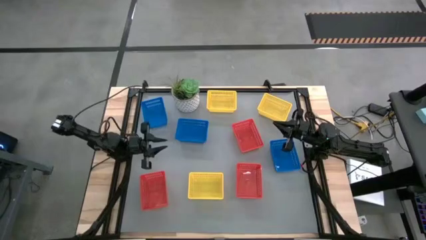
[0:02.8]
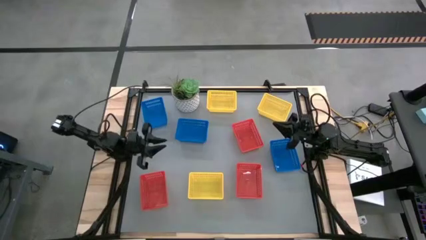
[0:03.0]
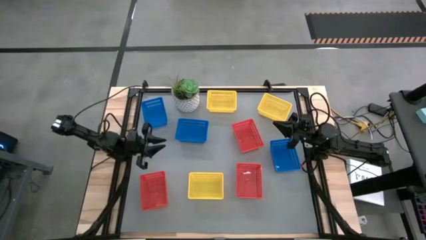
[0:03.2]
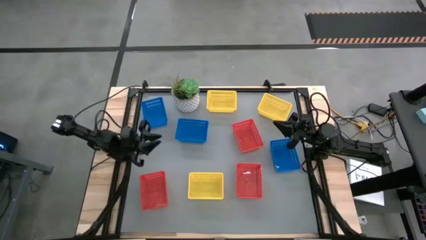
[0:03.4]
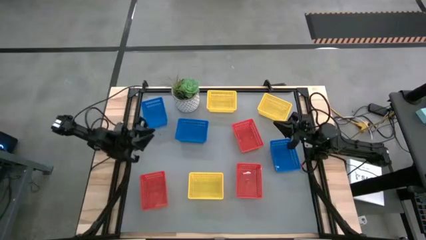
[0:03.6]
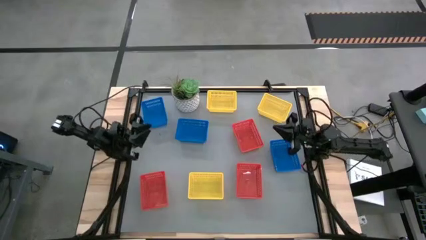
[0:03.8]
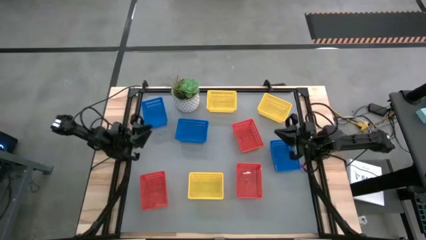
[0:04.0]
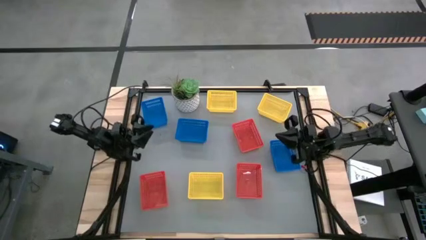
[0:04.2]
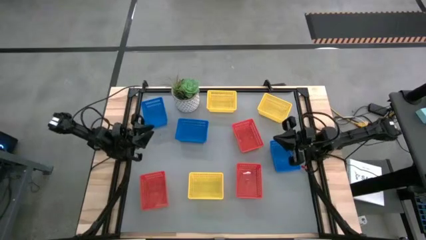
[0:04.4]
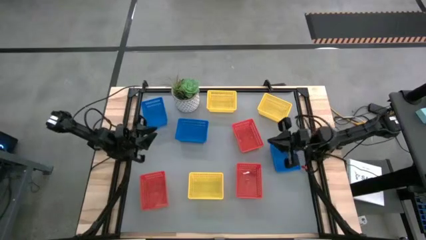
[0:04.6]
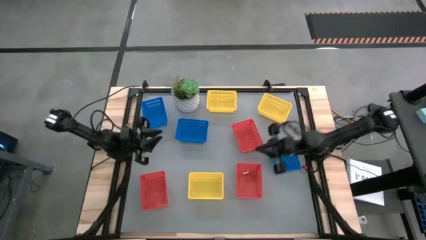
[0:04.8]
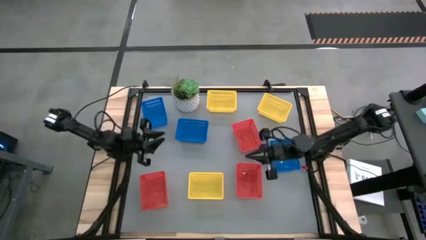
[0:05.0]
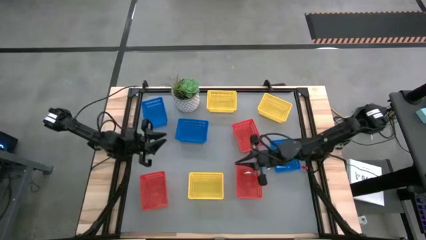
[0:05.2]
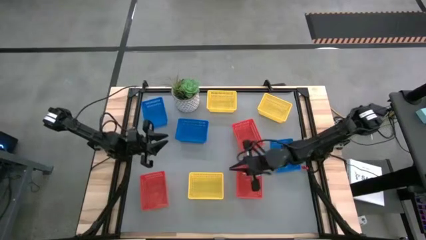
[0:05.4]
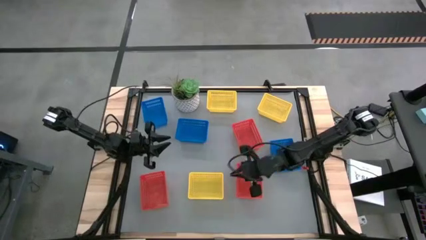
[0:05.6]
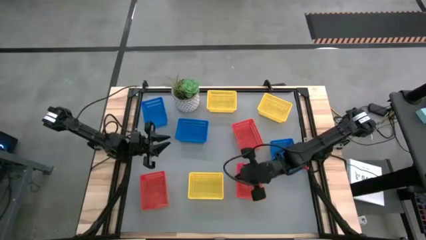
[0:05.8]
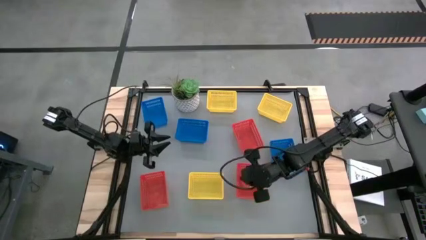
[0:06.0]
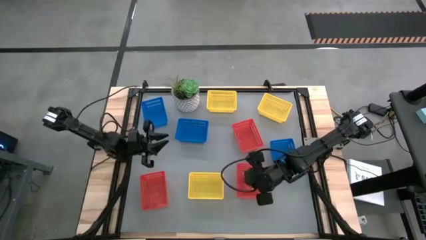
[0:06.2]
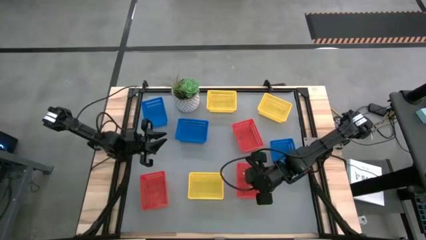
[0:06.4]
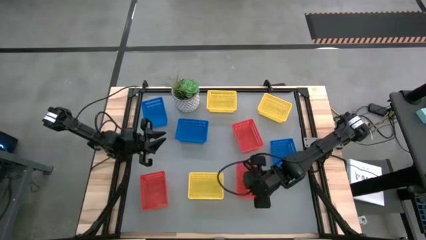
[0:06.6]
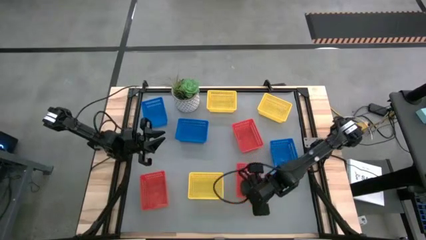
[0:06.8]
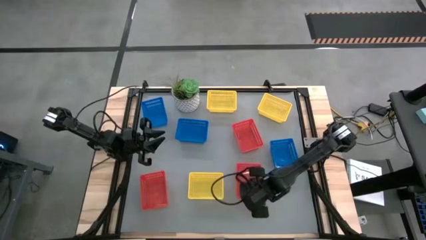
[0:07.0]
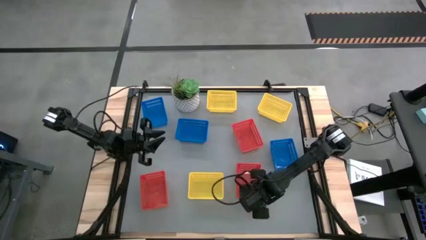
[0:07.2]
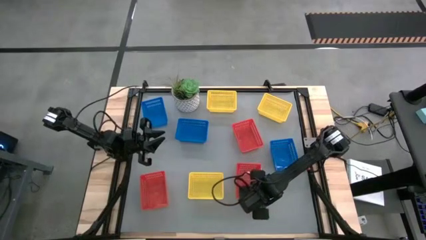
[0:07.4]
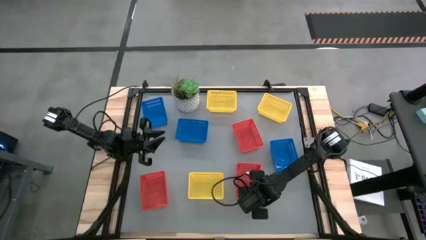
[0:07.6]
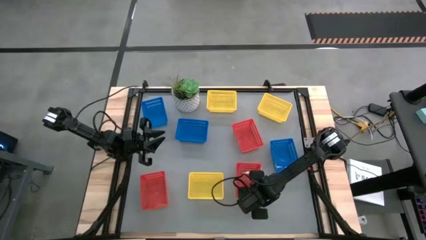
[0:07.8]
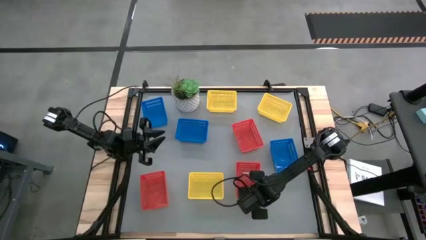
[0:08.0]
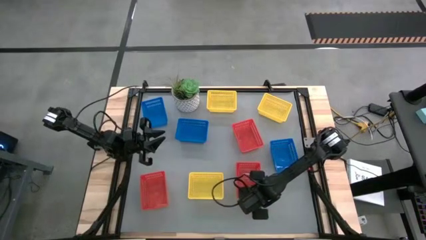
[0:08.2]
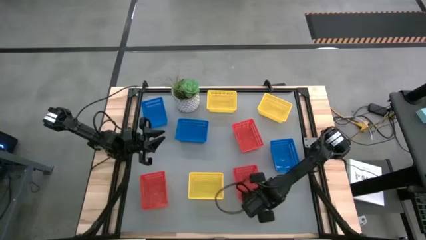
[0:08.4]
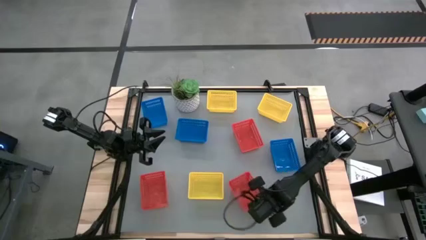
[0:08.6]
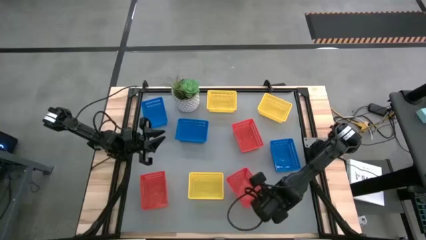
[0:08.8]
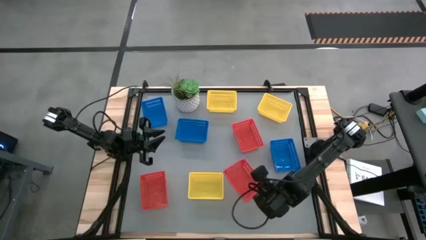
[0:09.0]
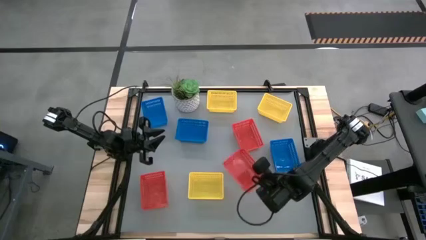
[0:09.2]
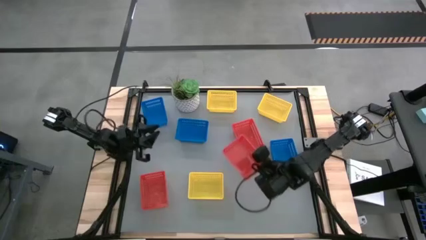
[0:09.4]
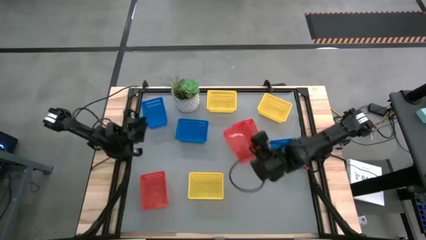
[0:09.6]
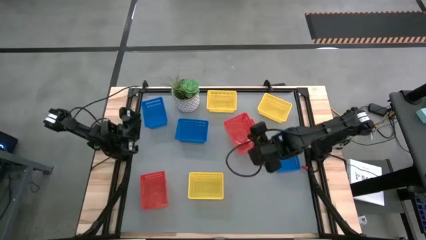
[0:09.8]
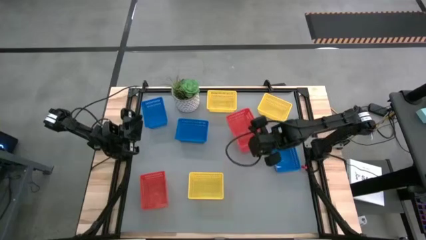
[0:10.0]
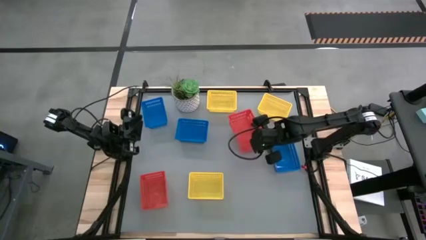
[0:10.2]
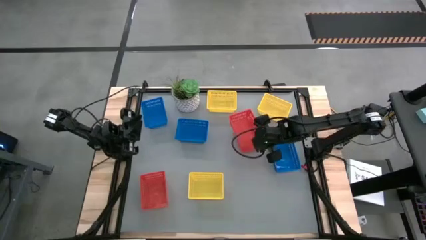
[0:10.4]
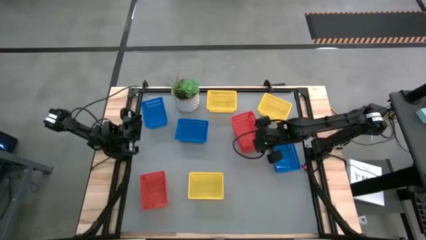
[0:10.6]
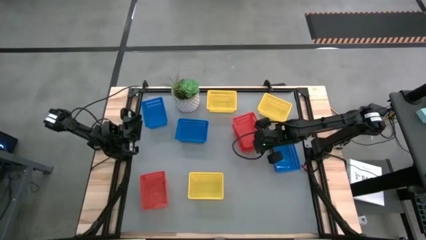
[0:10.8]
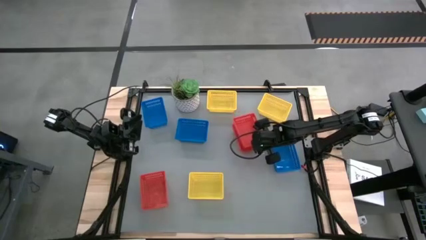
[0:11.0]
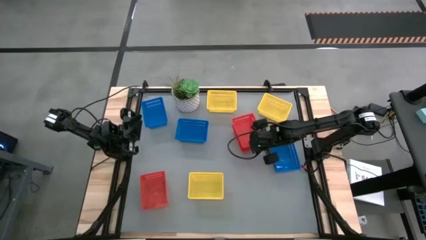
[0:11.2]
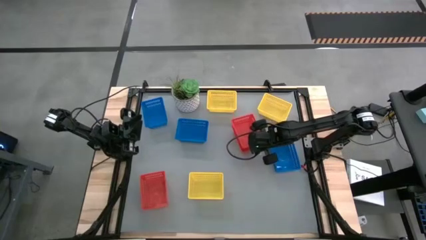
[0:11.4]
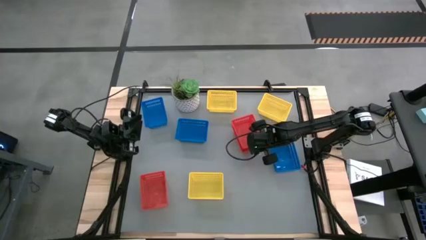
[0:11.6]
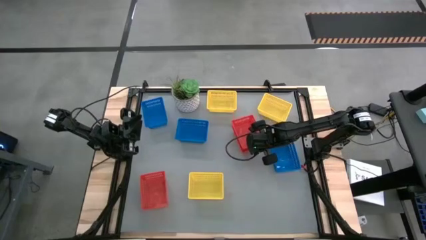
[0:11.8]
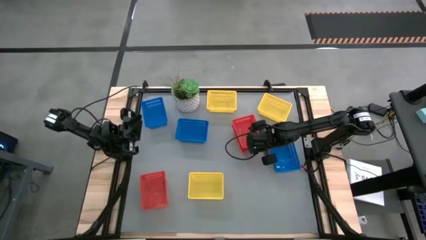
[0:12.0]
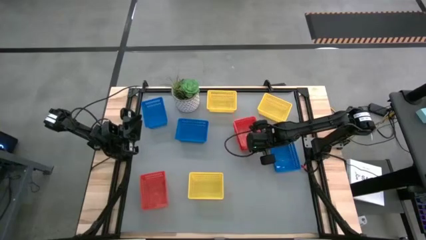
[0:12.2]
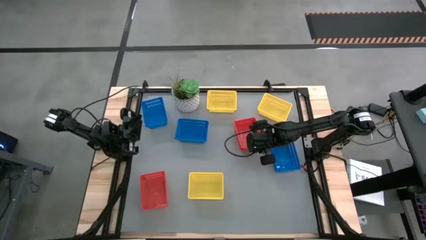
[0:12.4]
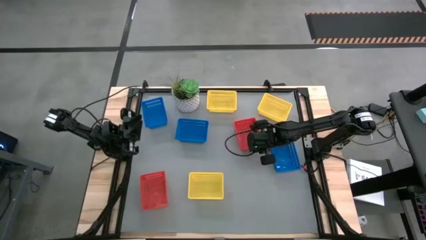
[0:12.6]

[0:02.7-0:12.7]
Stack the bottom right red bin on top of the top right red bin
